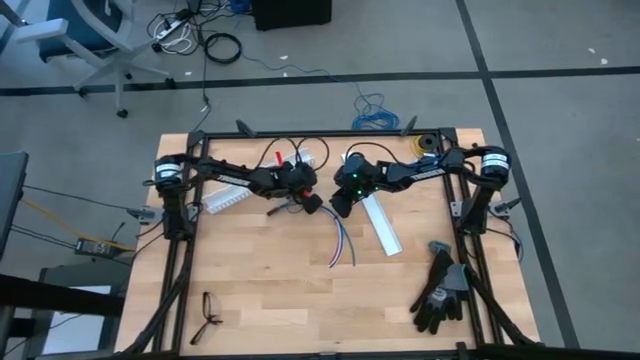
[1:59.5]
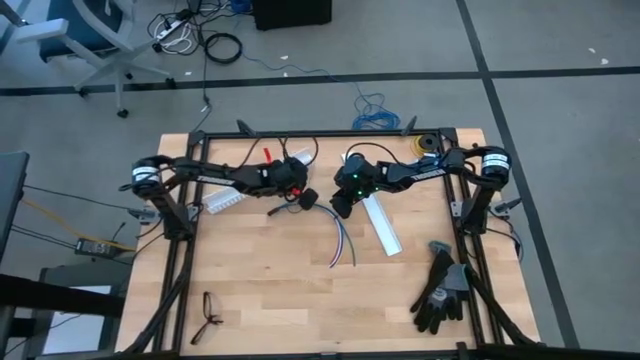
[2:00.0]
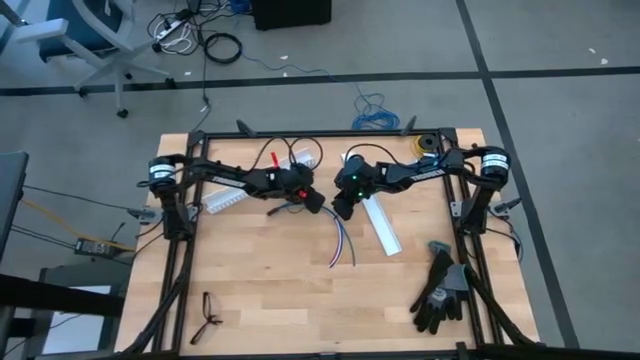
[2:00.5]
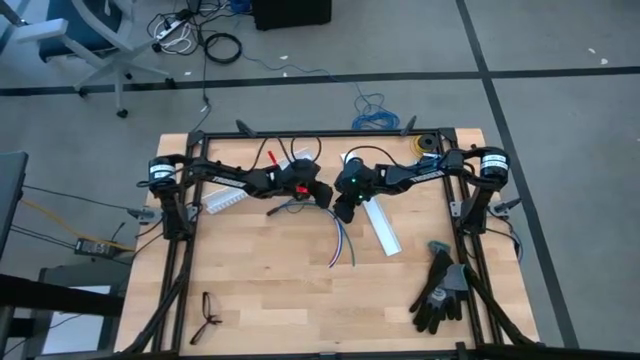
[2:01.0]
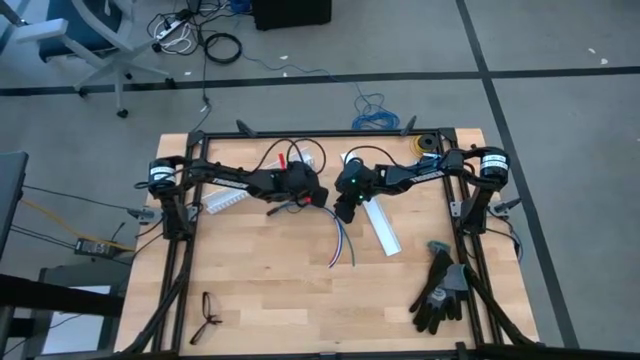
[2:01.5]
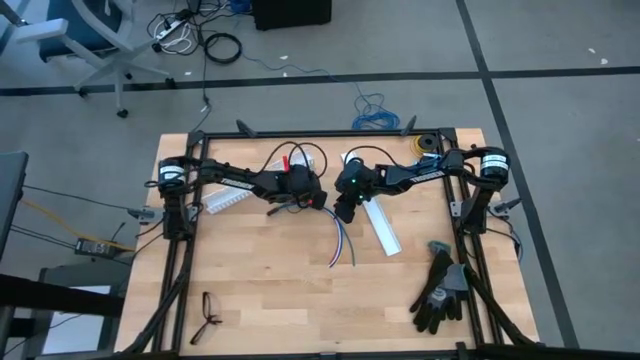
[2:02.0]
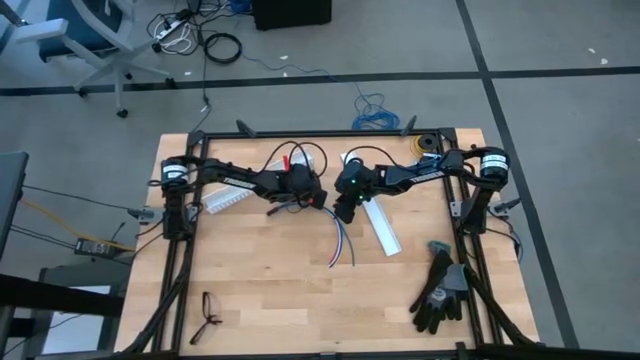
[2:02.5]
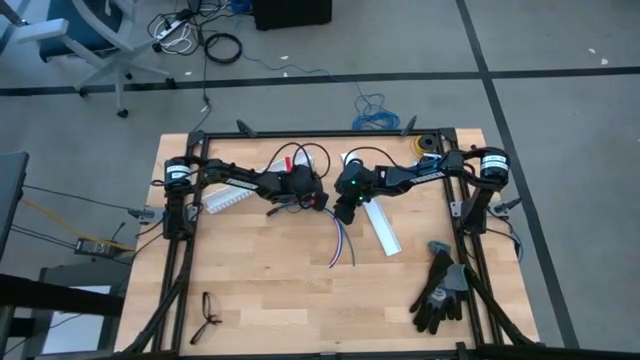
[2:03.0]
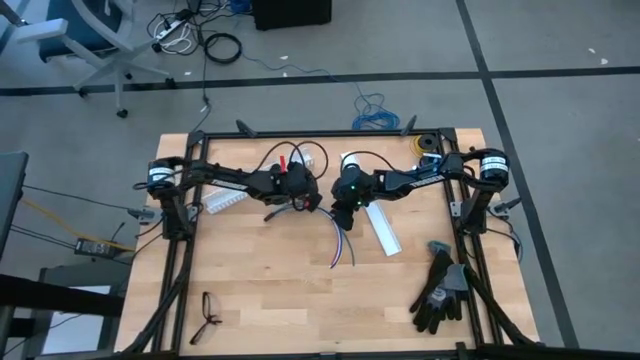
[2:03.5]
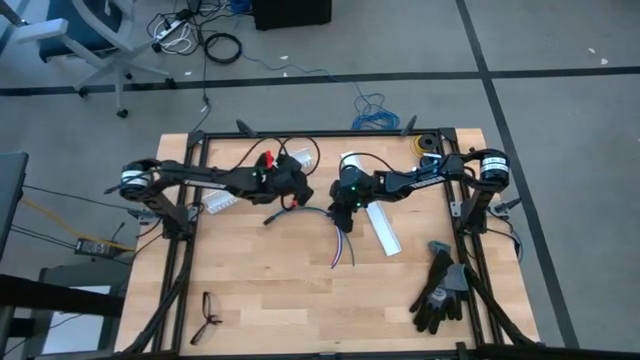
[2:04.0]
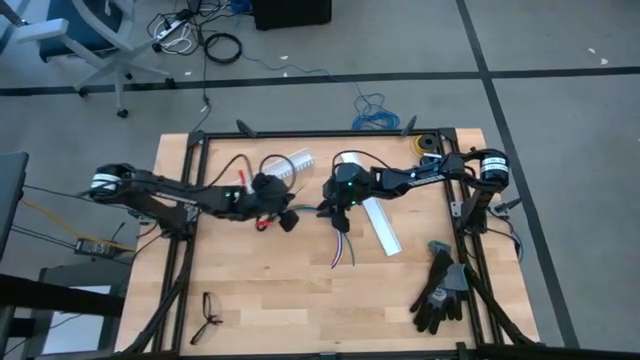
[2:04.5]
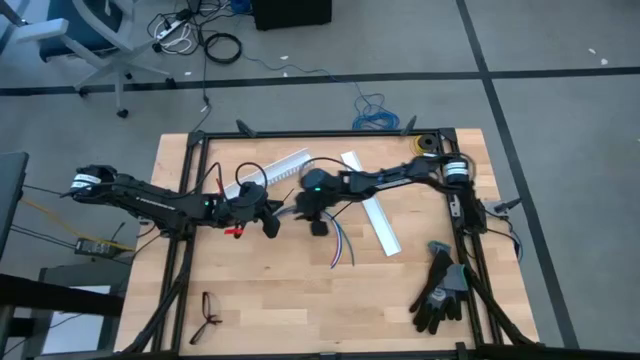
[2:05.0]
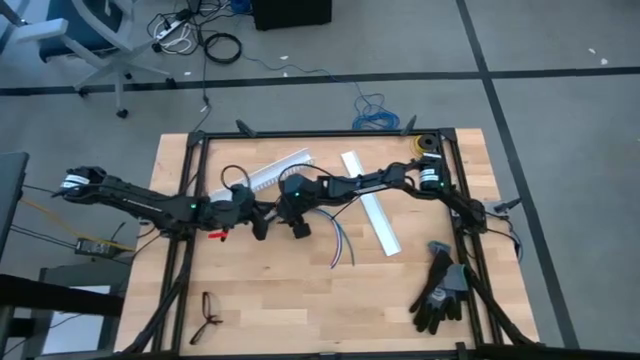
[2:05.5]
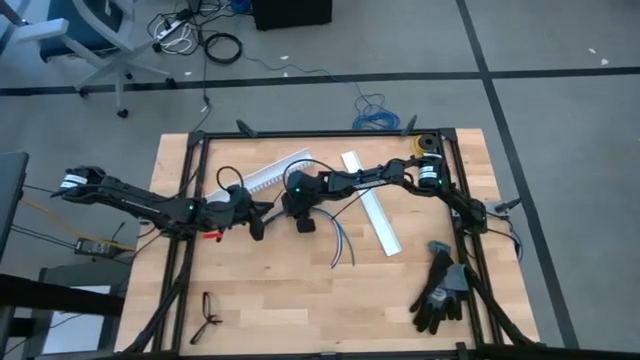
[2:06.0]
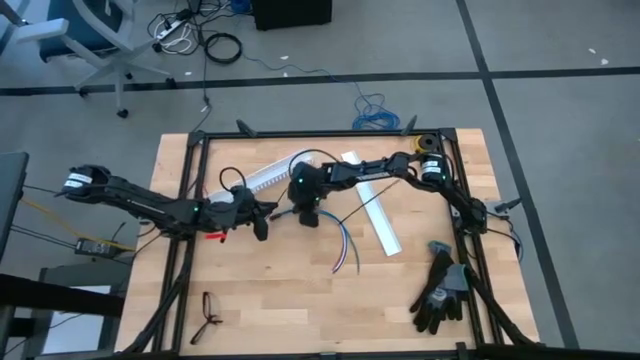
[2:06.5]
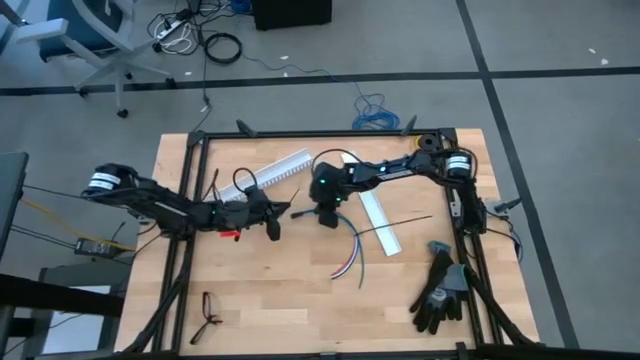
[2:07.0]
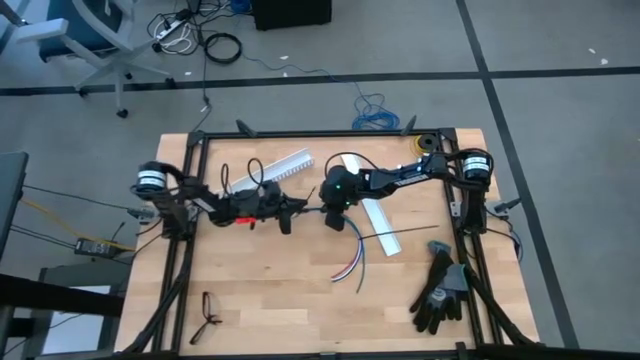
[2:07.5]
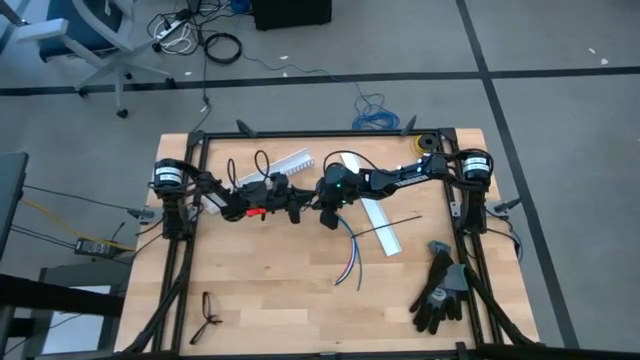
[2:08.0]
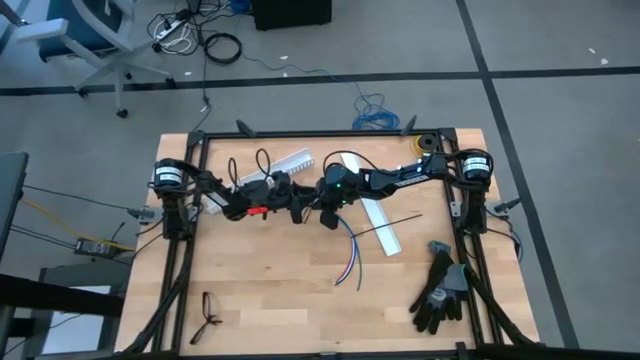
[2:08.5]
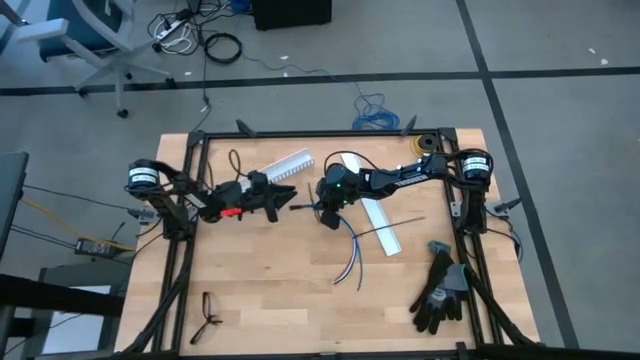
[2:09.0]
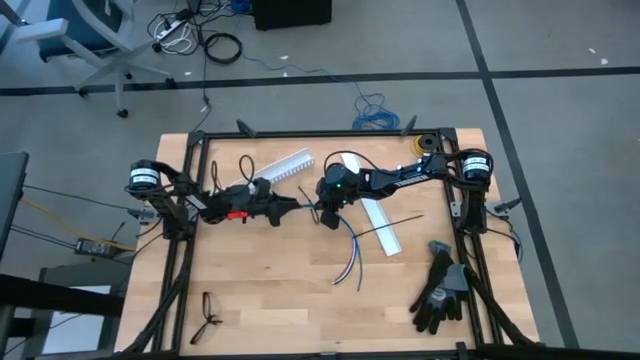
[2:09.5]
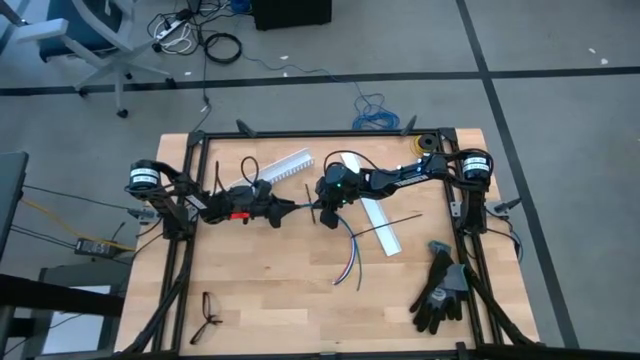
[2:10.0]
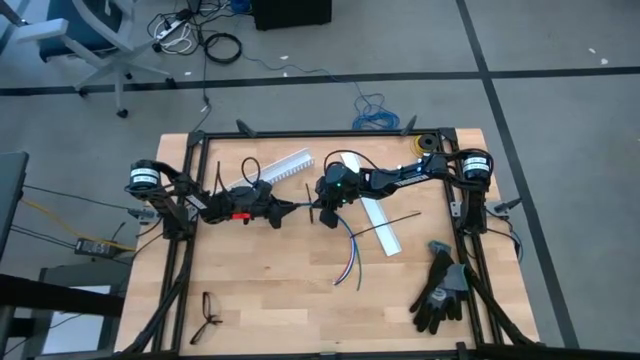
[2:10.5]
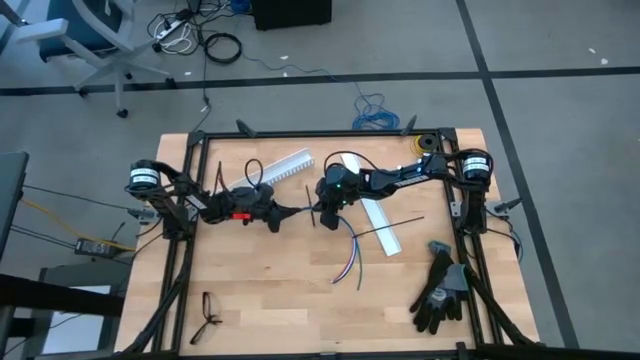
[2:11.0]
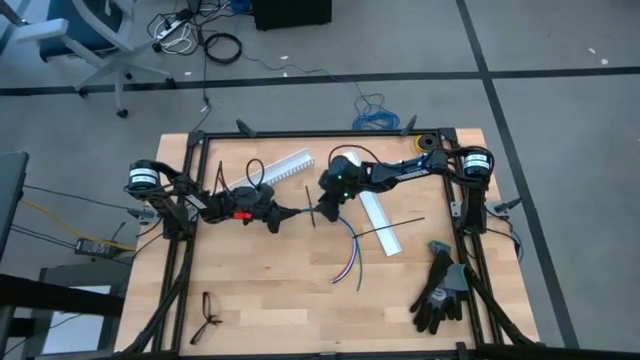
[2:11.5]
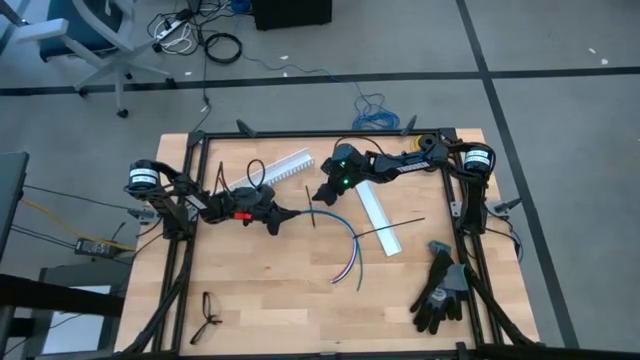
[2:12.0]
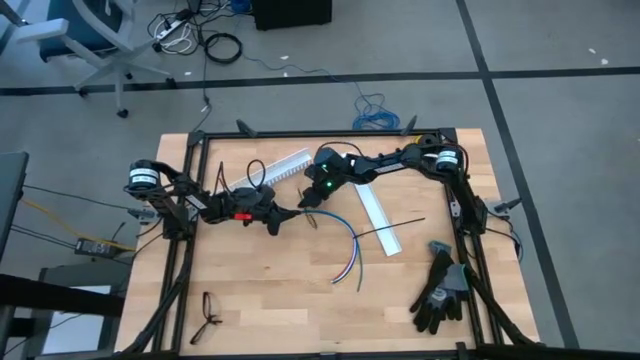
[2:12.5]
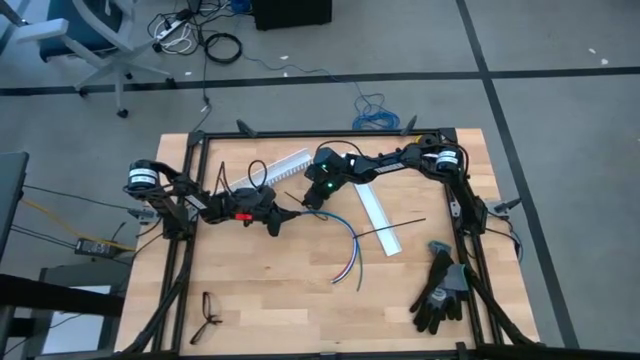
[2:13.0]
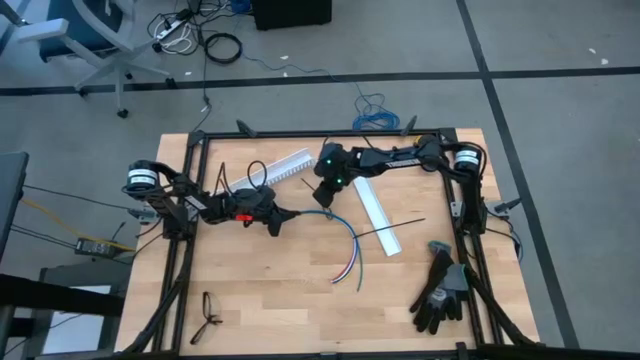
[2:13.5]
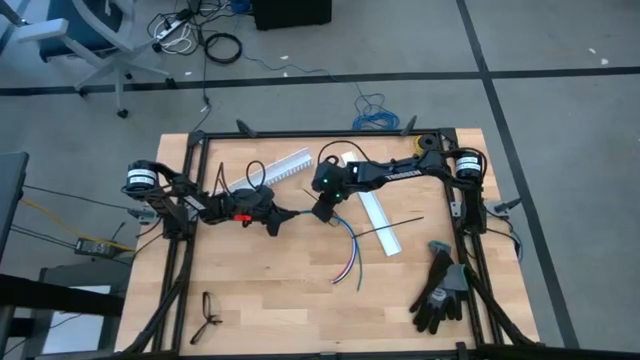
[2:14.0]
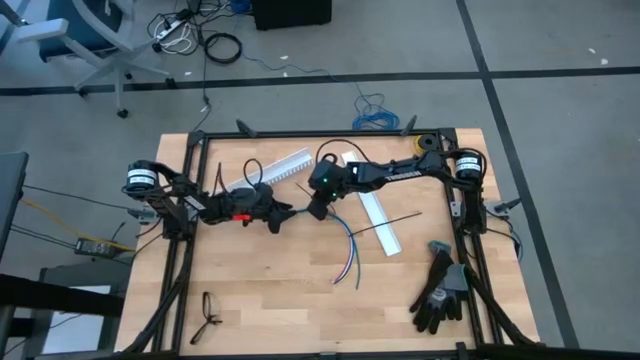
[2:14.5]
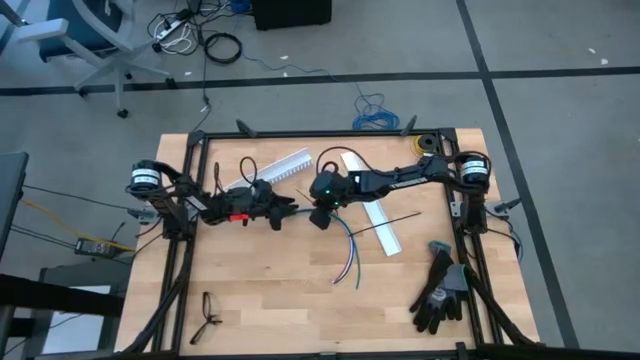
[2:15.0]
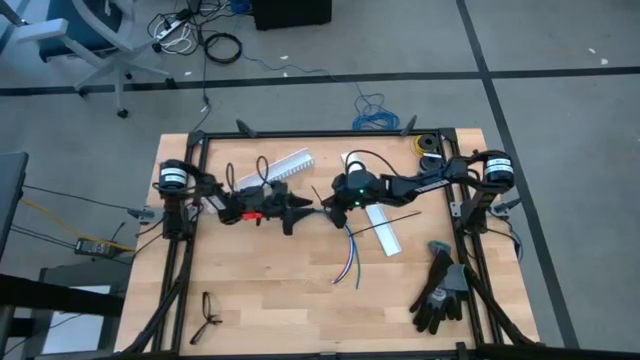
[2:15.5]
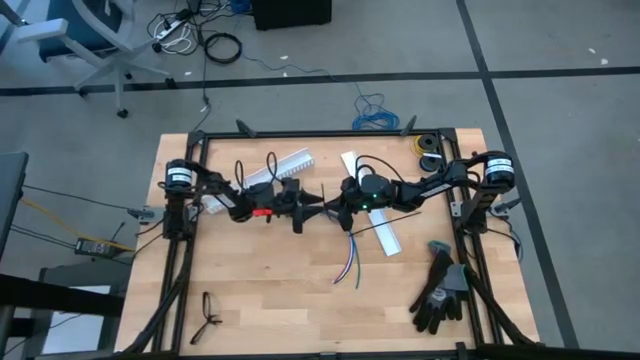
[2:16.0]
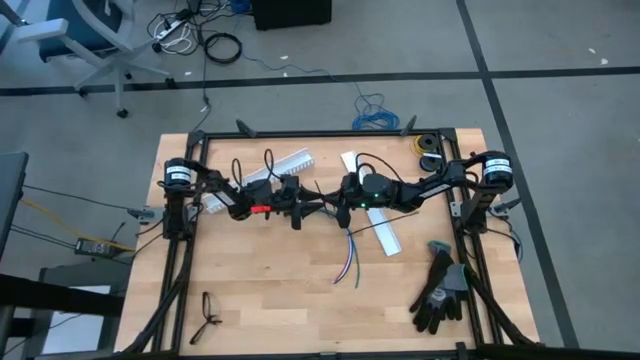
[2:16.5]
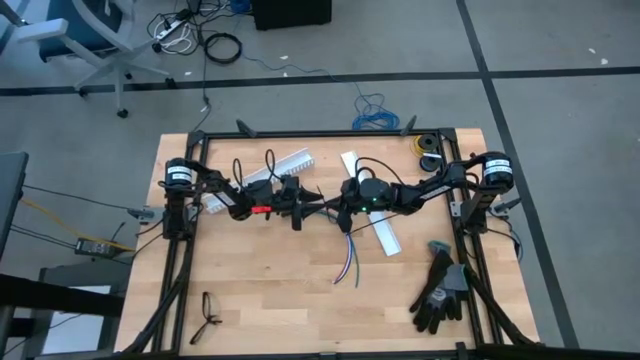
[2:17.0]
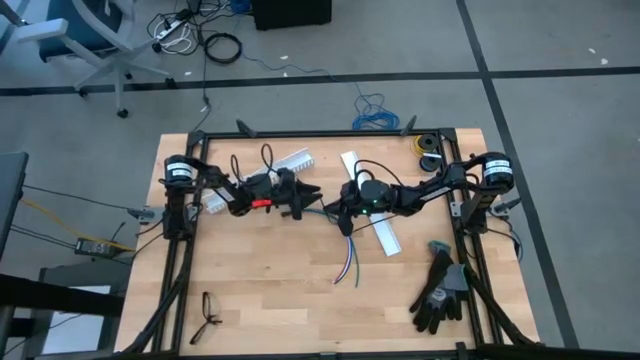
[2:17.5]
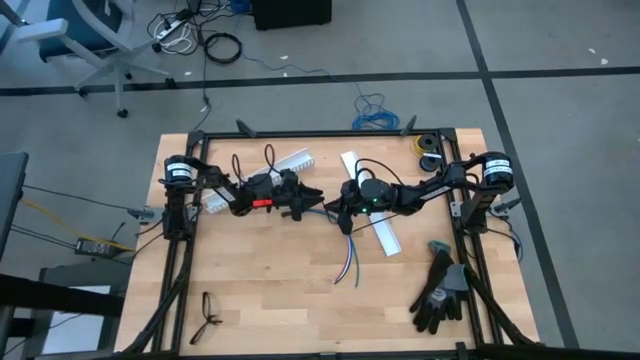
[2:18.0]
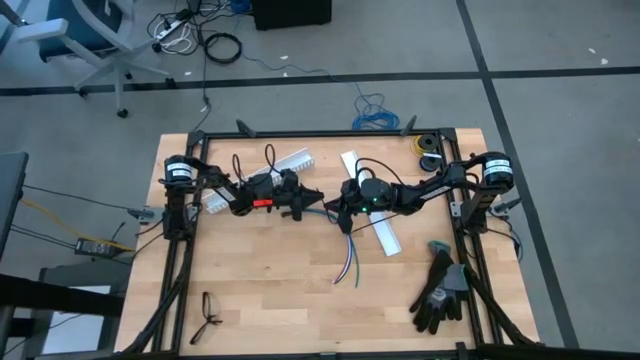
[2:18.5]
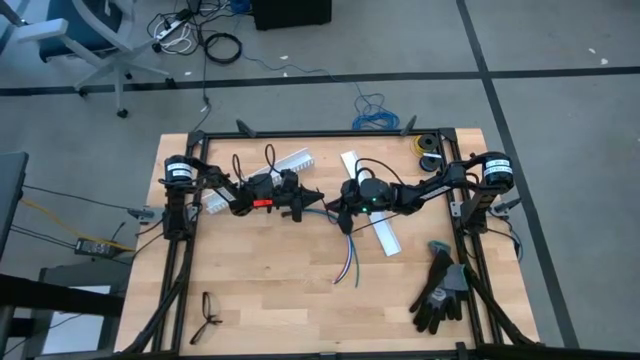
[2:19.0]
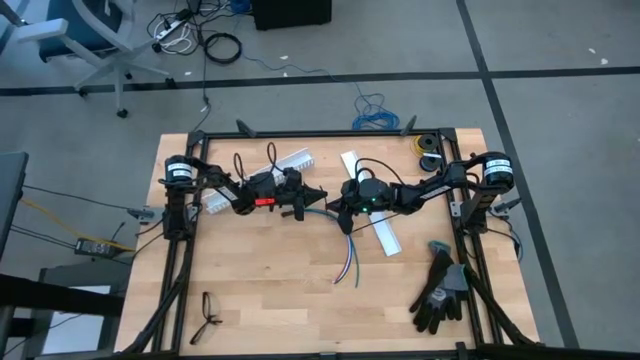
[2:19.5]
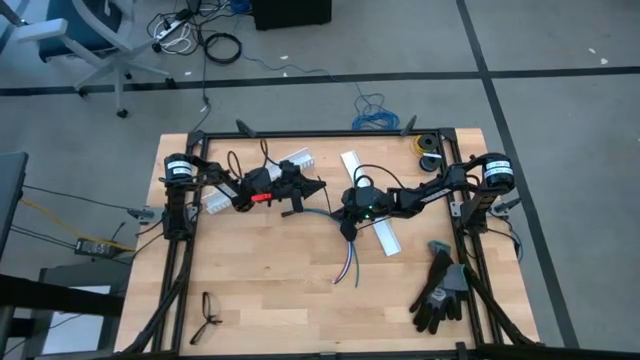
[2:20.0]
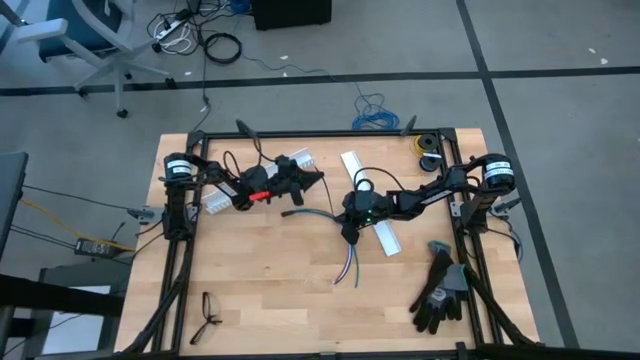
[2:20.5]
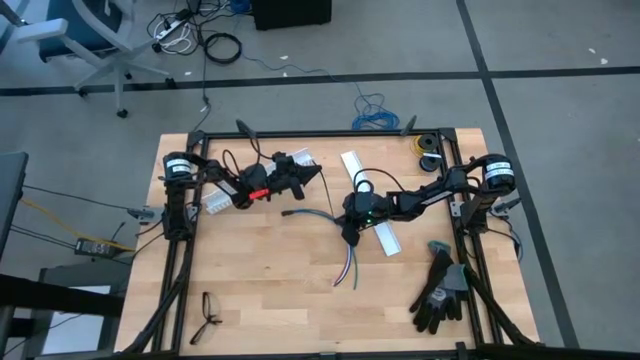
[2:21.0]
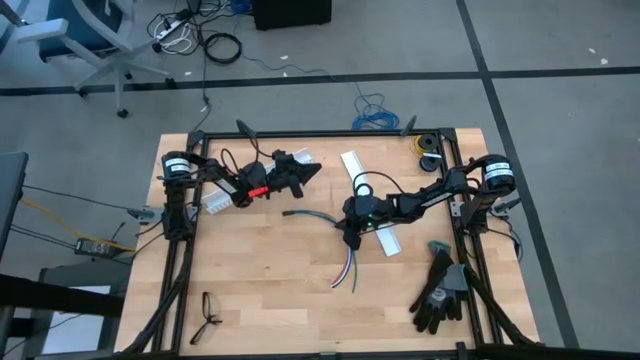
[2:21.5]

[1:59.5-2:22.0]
Task: Ziptie cables
Wrap the cable wires with the black zip tie
